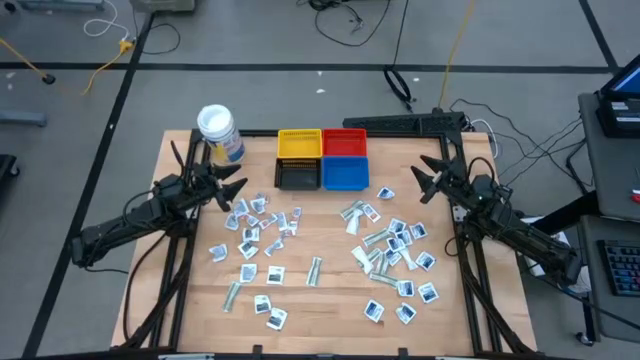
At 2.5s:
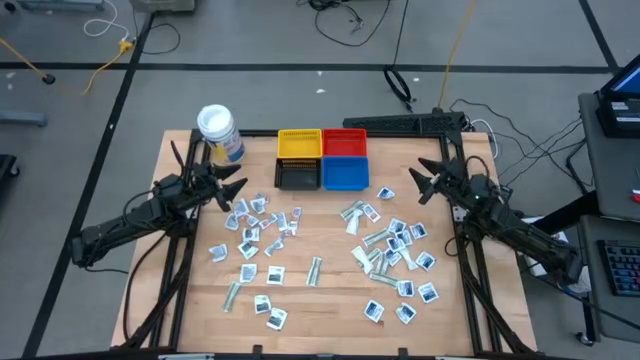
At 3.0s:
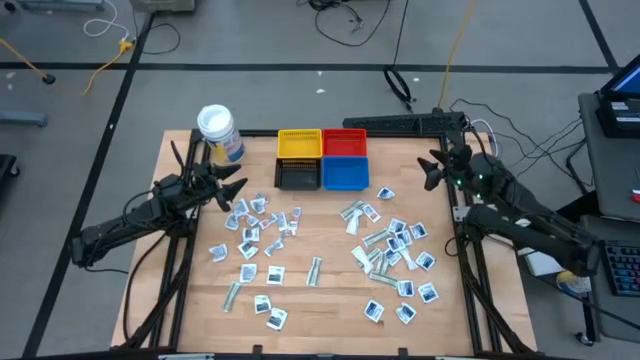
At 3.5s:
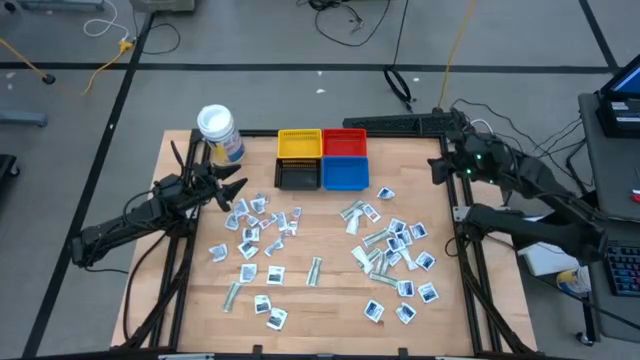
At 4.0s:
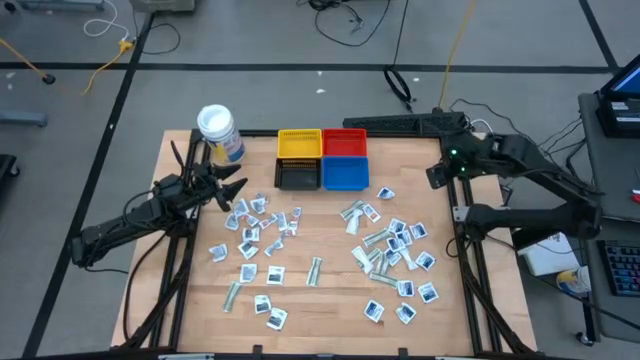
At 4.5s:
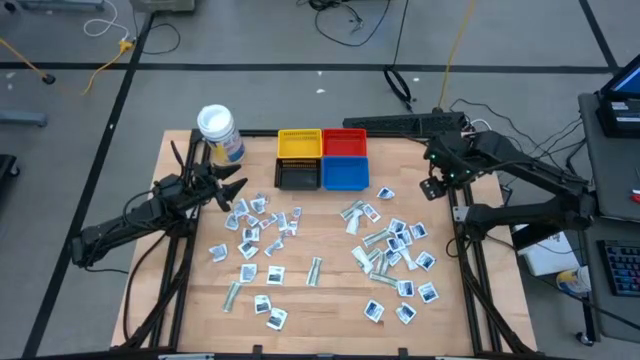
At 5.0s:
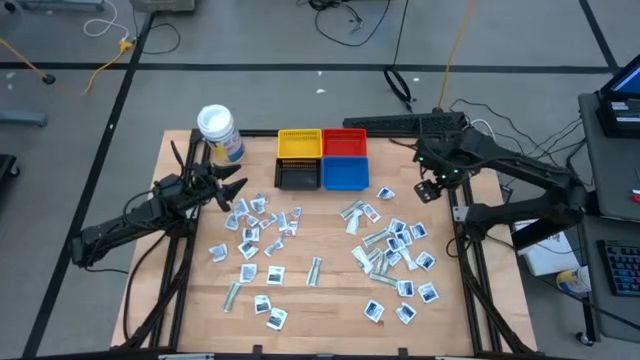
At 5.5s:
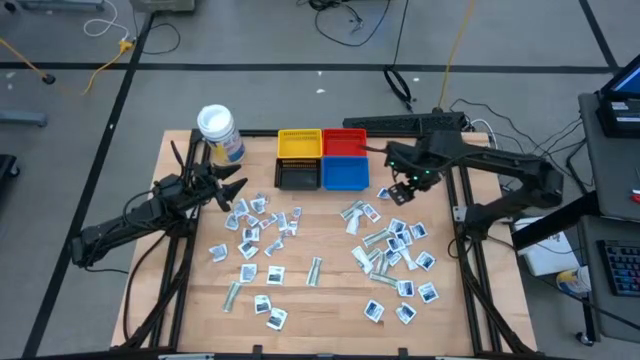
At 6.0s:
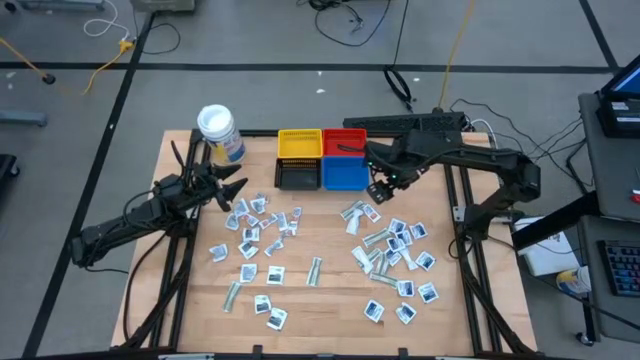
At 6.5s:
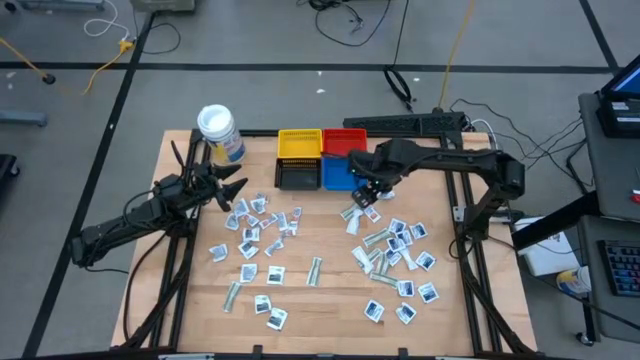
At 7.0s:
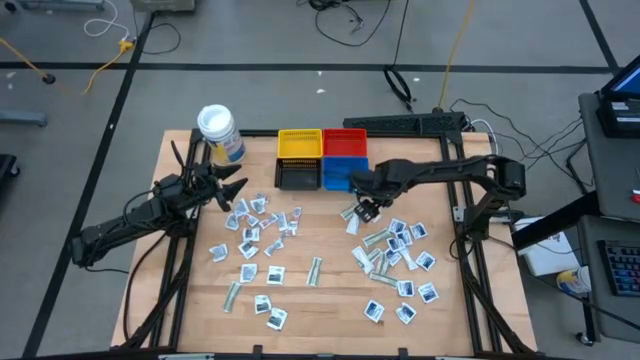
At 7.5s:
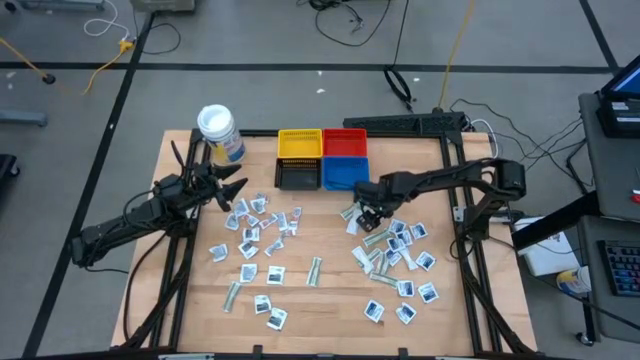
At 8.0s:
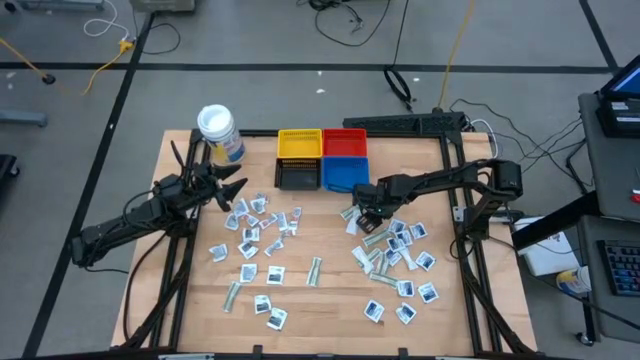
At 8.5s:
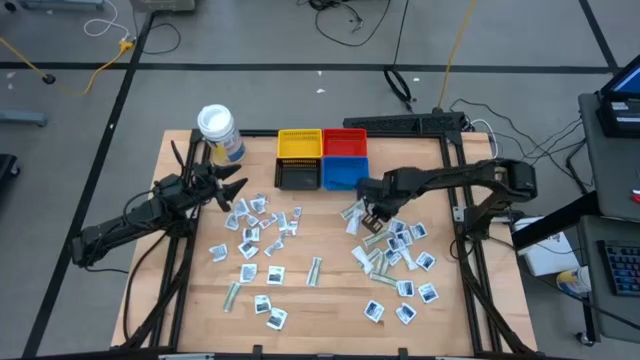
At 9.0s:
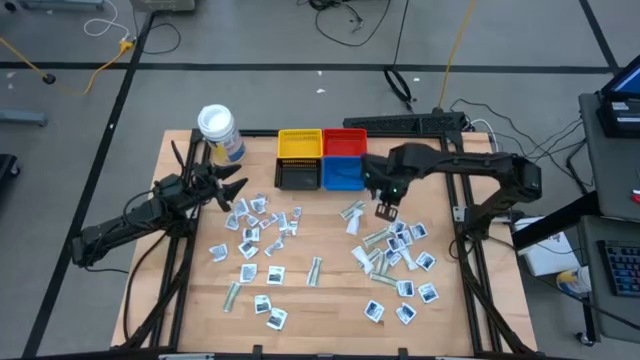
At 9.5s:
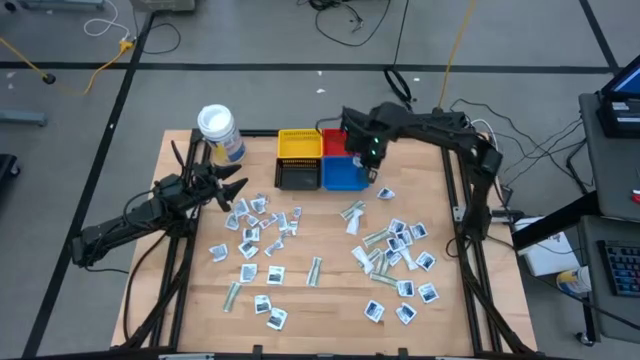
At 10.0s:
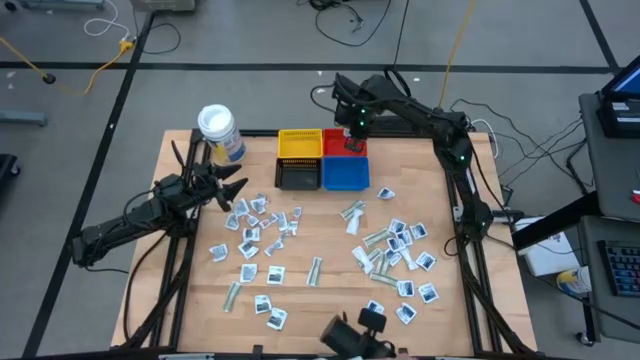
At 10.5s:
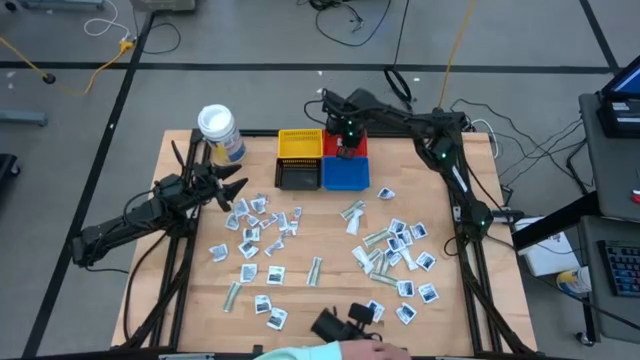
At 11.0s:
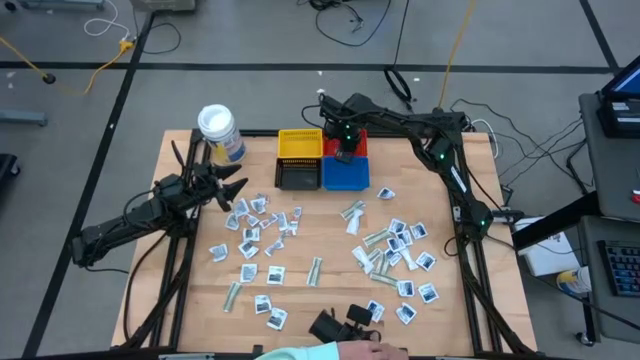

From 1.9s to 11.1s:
Task: Pick & Place First Aid Supplies
Put the orange ointment pack into the red basket

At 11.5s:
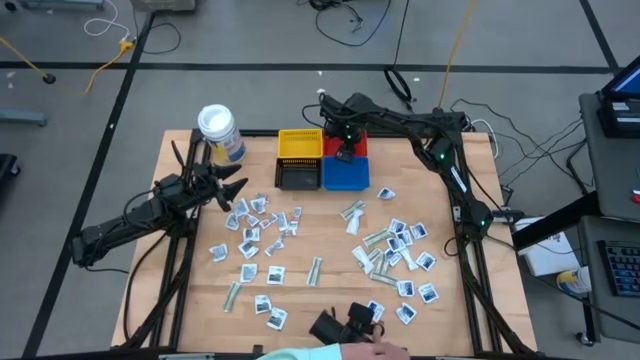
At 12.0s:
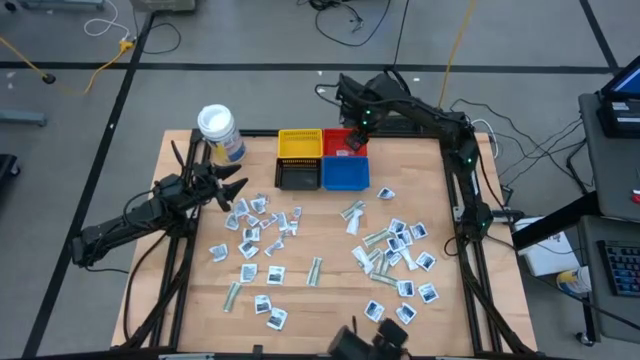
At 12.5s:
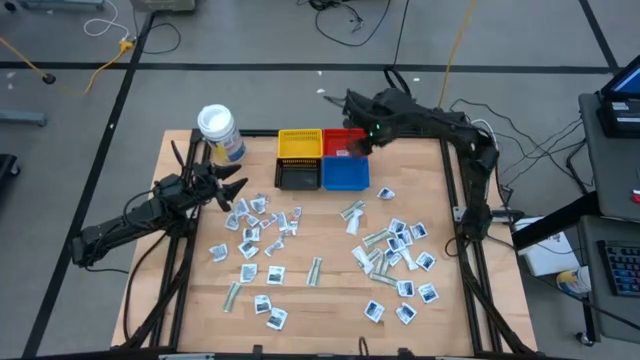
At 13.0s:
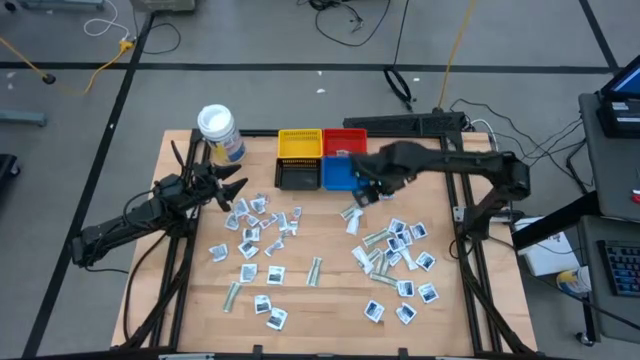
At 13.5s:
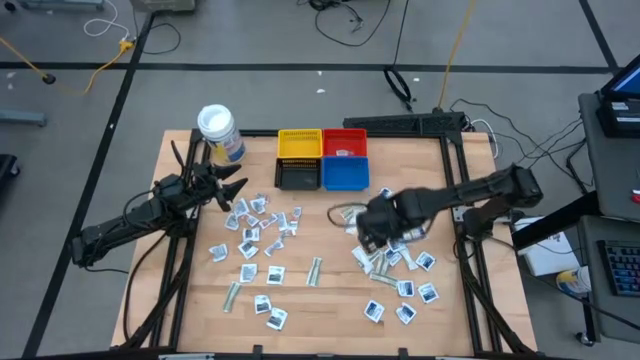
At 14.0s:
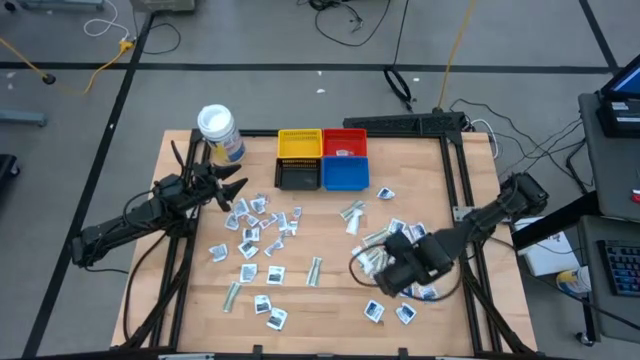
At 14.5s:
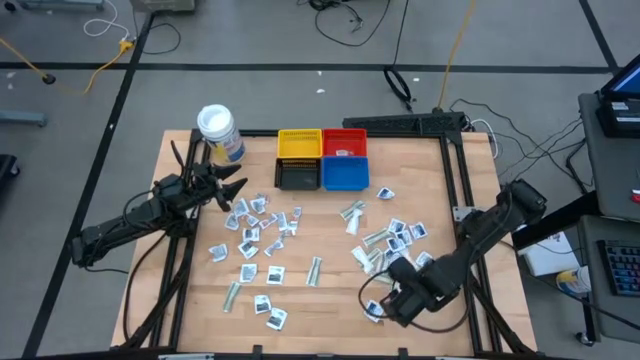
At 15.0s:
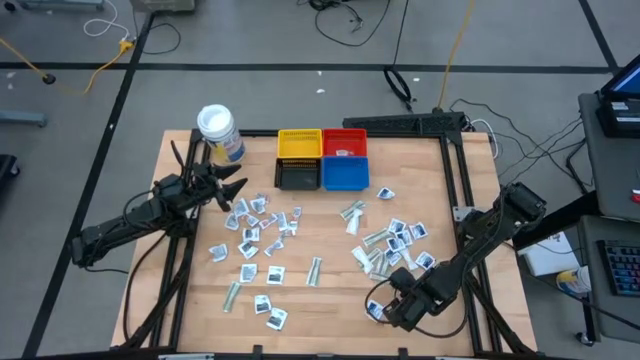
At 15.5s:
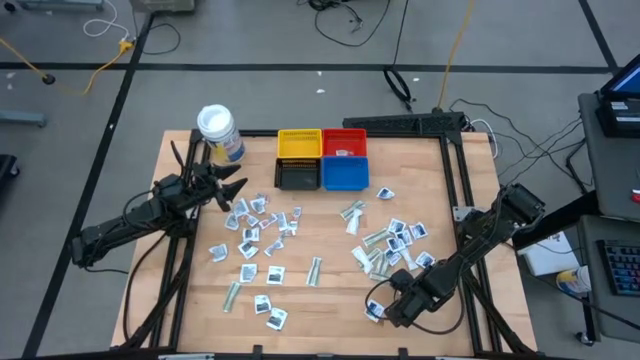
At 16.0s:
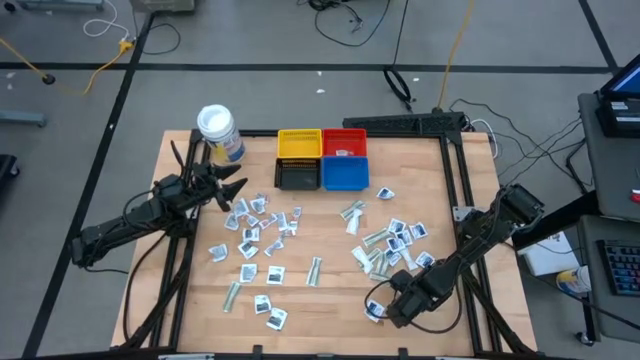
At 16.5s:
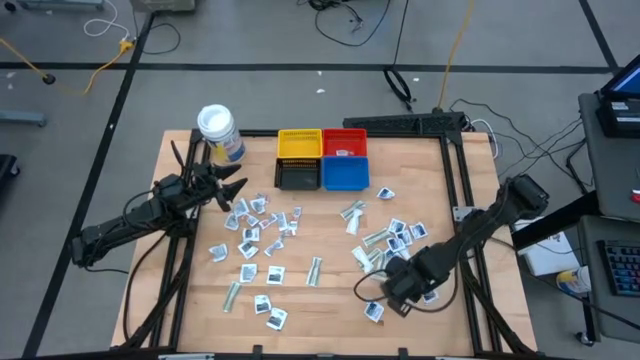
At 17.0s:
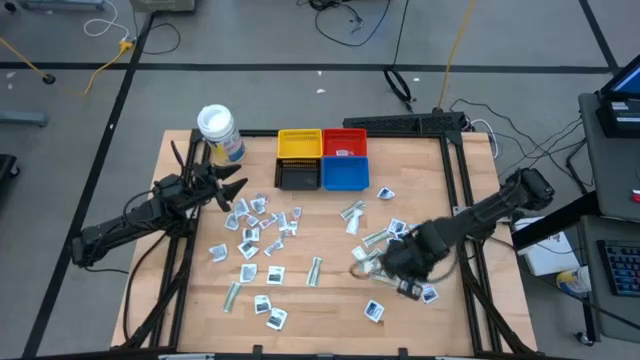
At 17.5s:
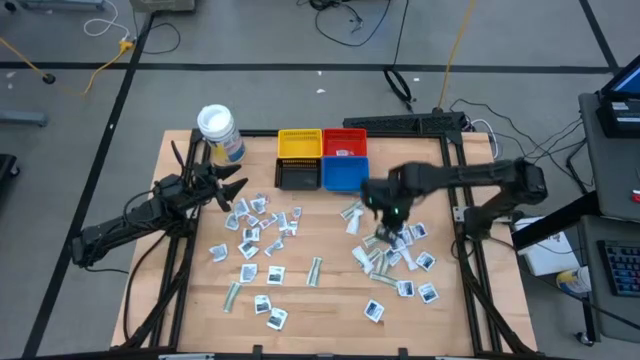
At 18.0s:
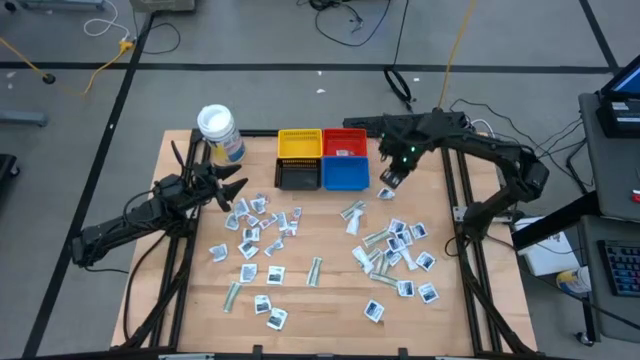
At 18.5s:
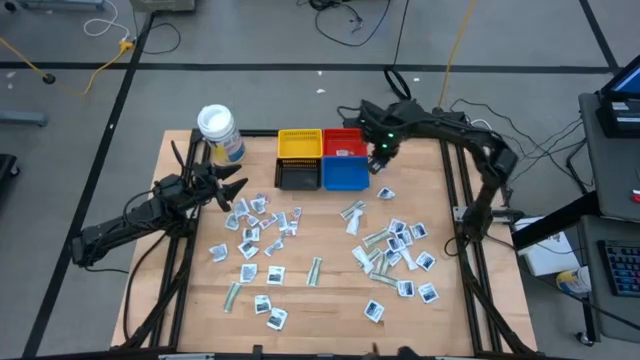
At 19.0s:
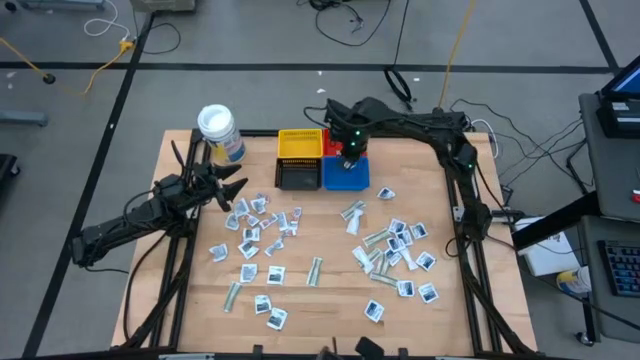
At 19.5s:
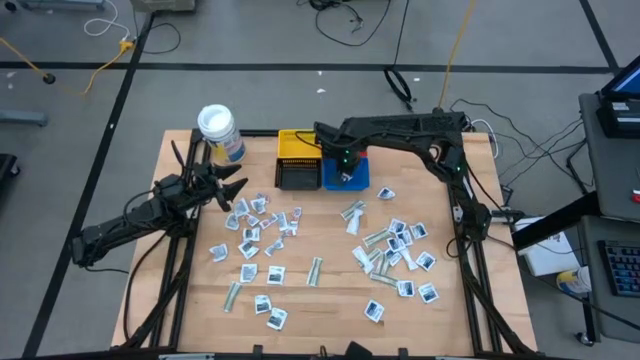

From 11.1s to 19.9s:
Put the blue alcohol pad into the blue basket

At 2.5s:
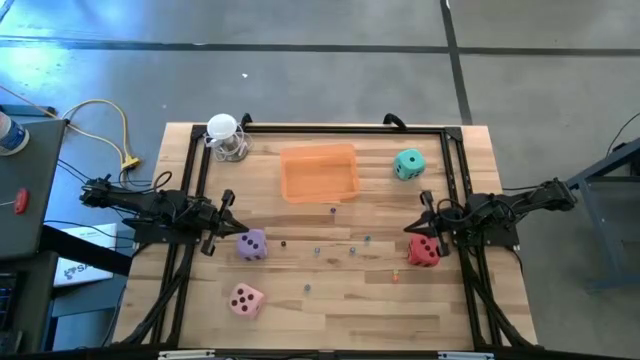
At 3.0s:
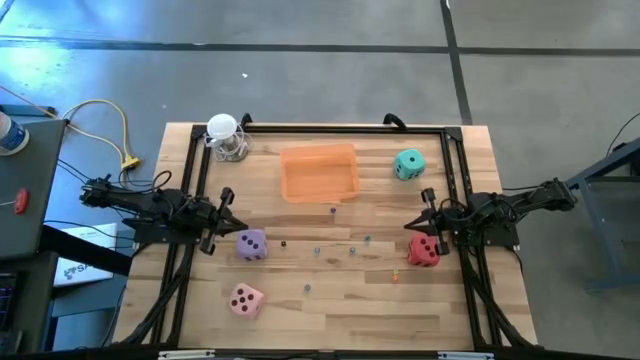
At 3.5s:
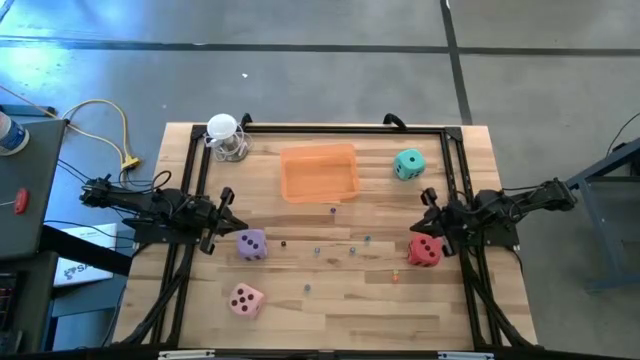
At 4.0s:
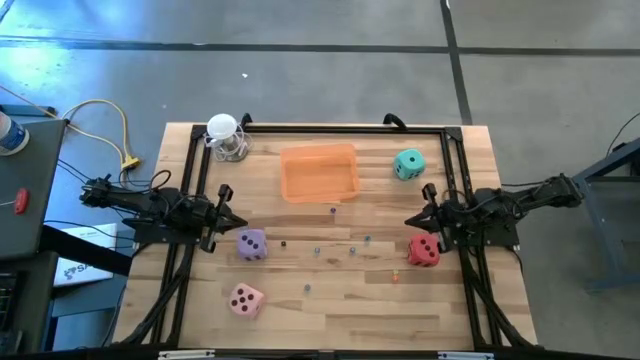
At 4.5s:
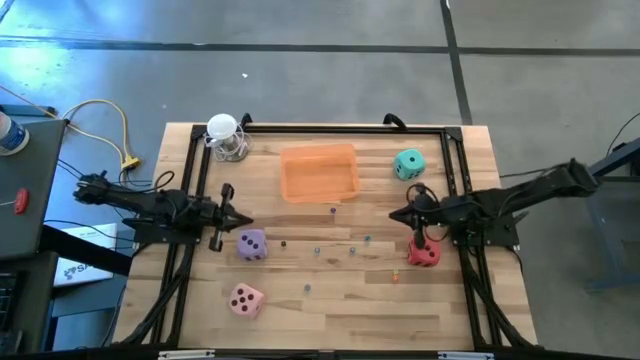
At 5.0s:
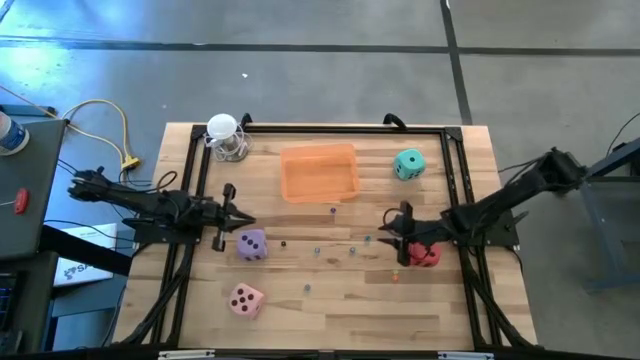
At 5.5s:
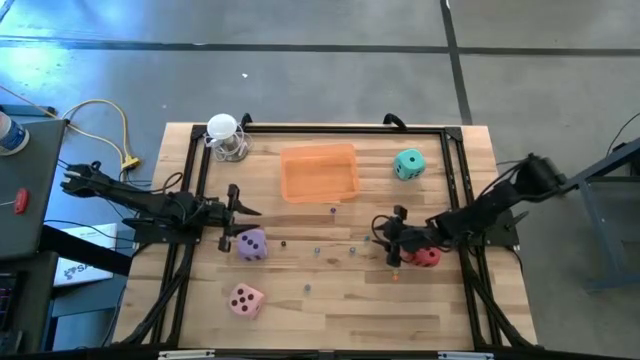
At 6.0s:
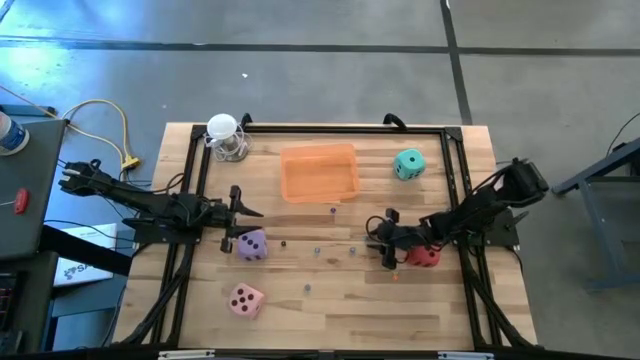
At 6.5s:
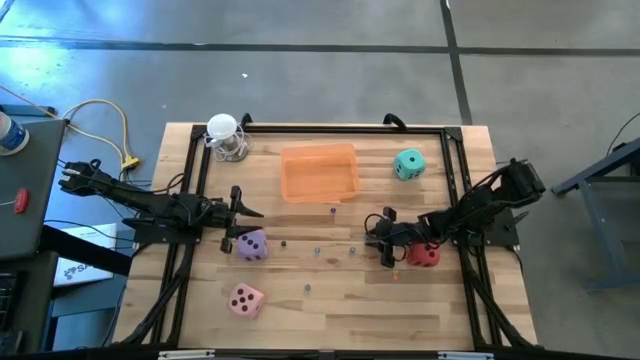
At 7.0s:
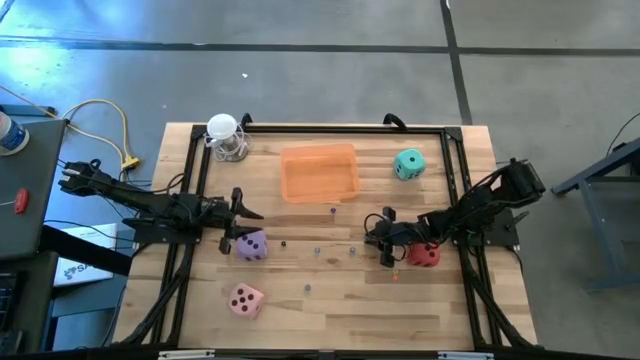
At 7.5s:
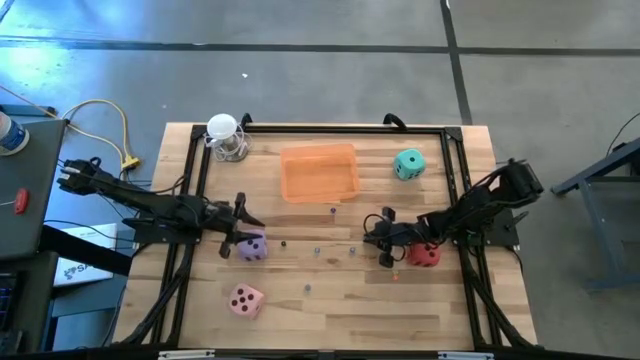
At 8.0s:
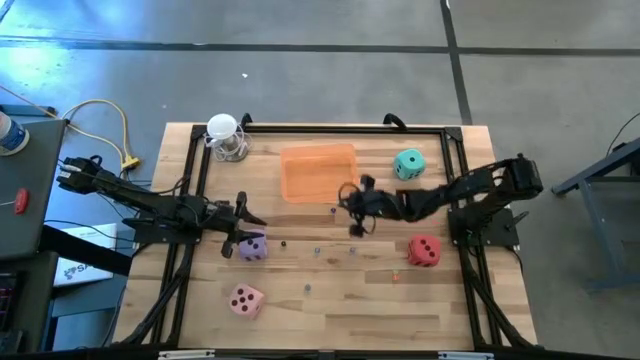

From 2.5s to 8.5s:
Task: Pick & Place Dice
Put the small light blue dice into the orange container
